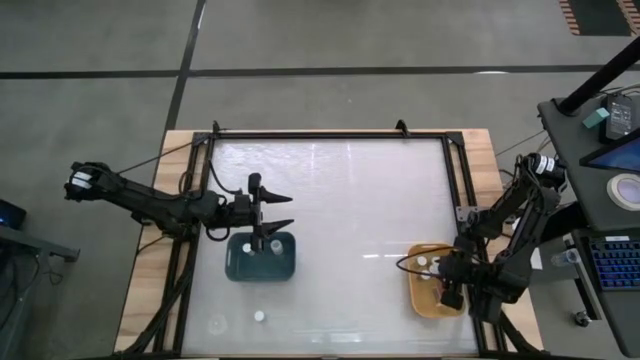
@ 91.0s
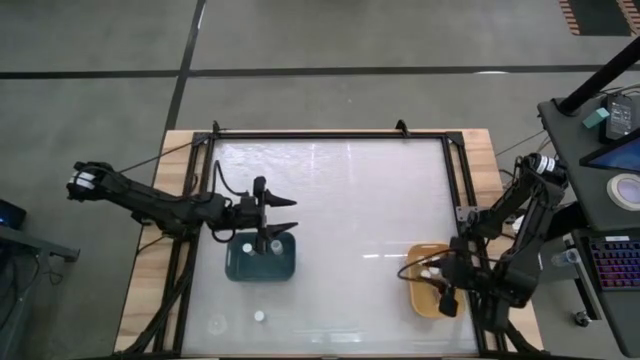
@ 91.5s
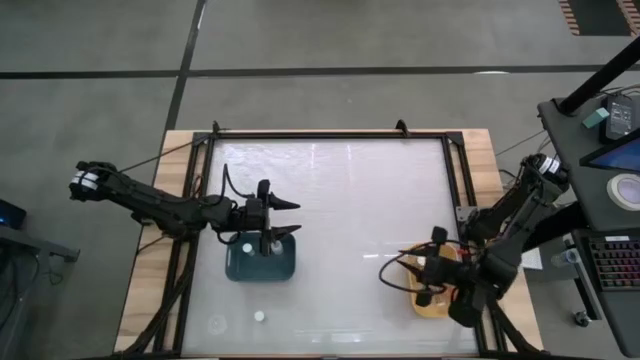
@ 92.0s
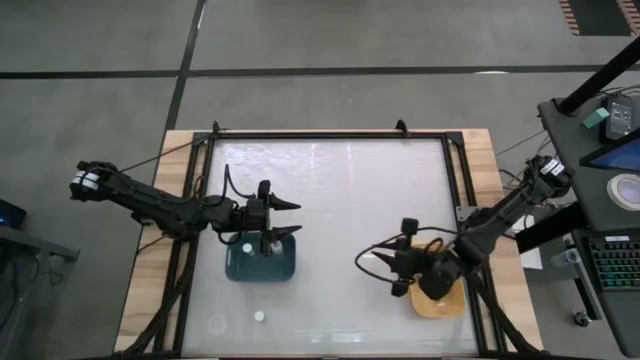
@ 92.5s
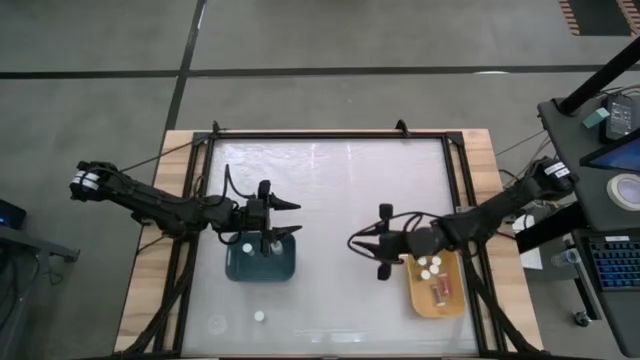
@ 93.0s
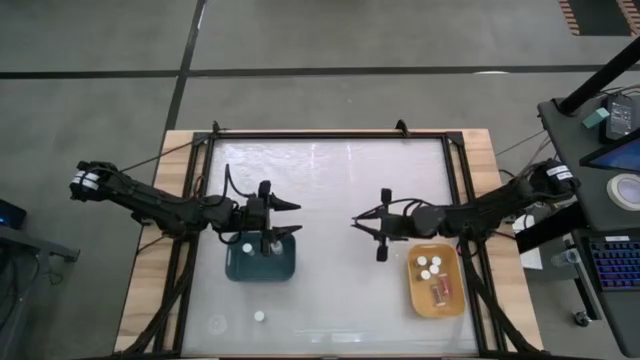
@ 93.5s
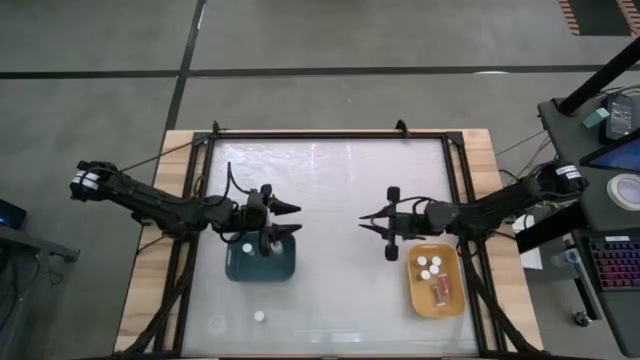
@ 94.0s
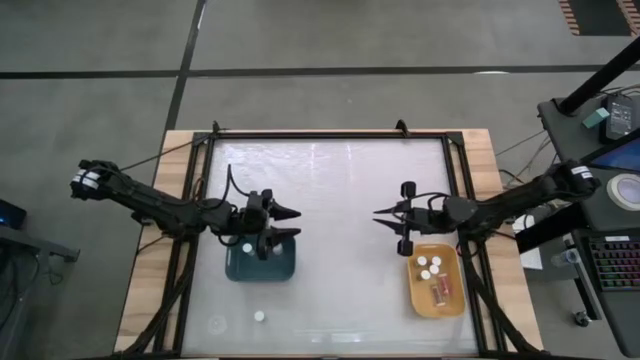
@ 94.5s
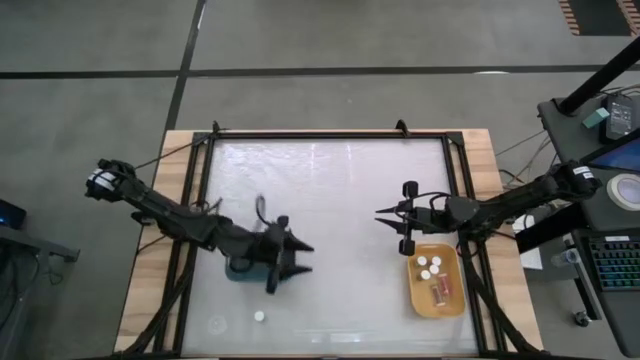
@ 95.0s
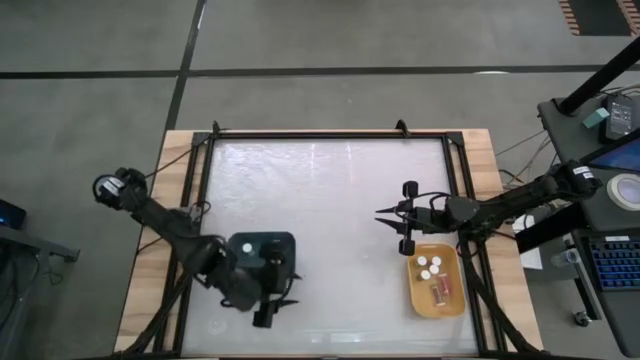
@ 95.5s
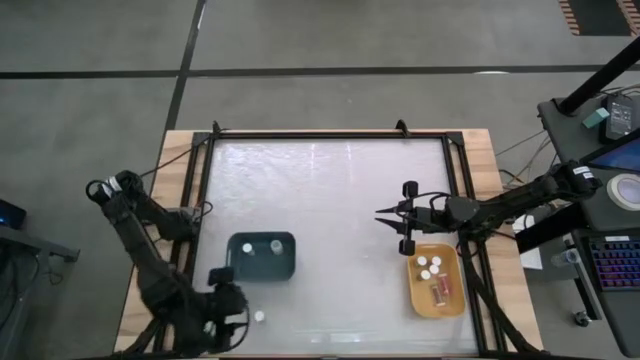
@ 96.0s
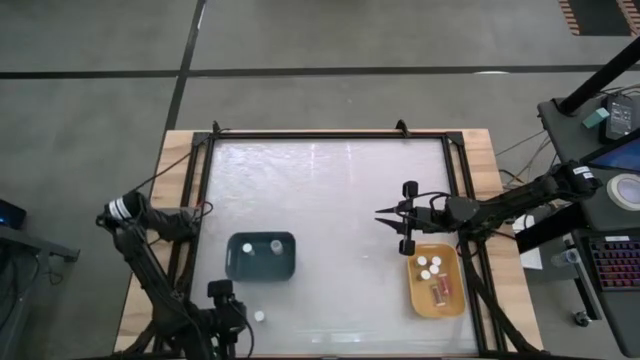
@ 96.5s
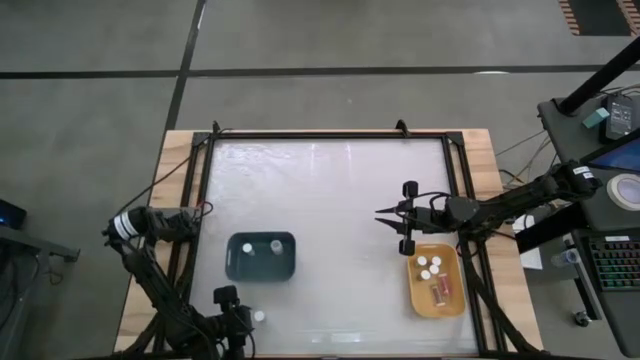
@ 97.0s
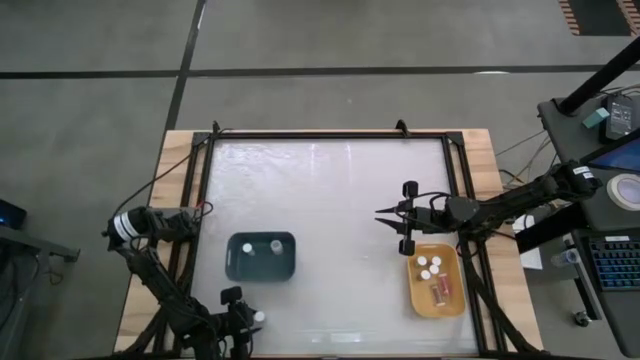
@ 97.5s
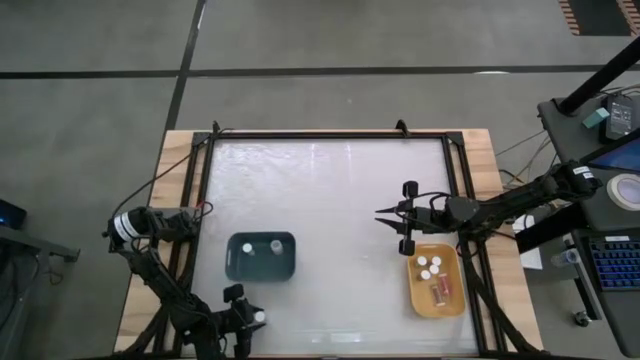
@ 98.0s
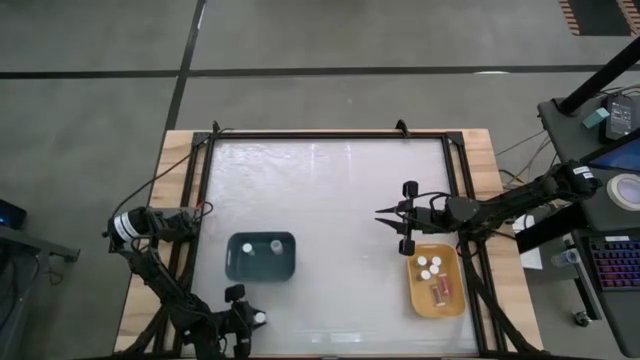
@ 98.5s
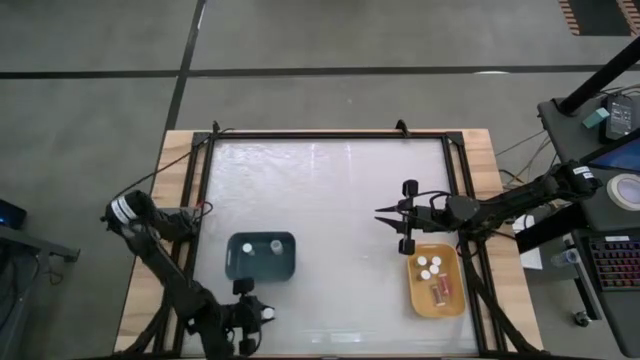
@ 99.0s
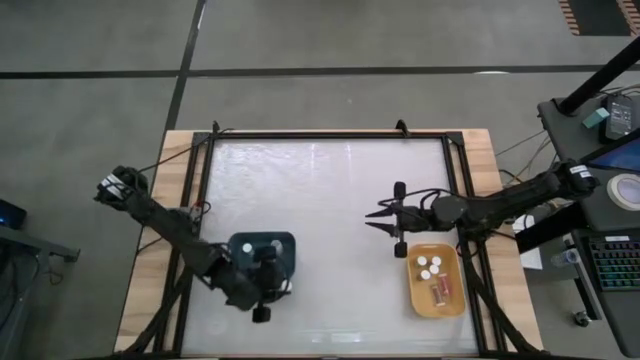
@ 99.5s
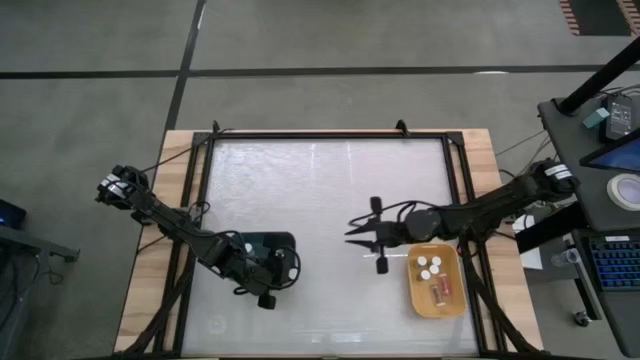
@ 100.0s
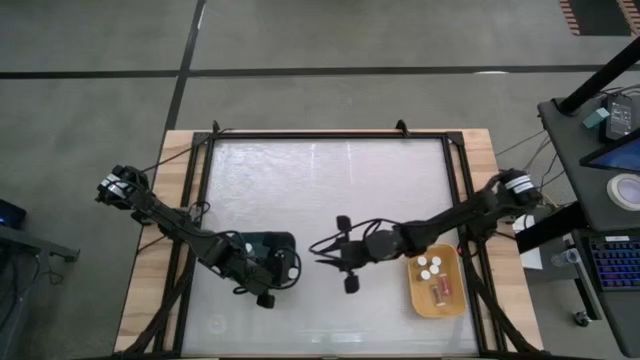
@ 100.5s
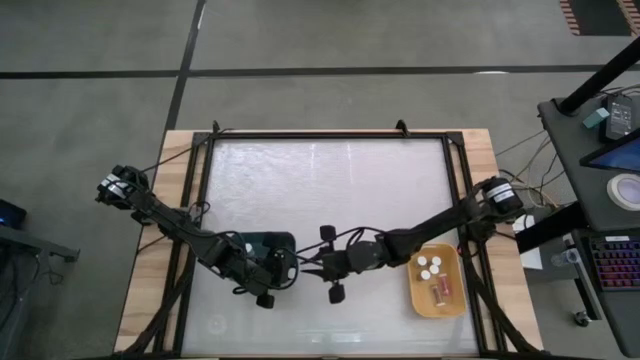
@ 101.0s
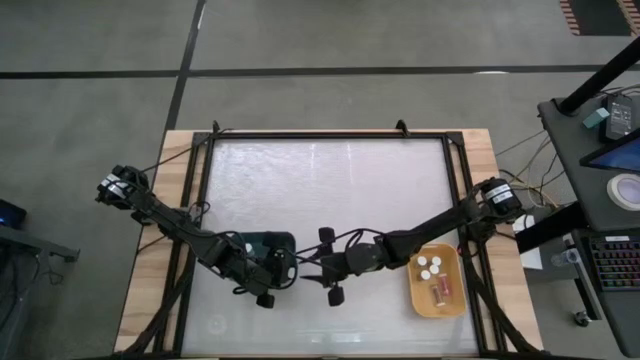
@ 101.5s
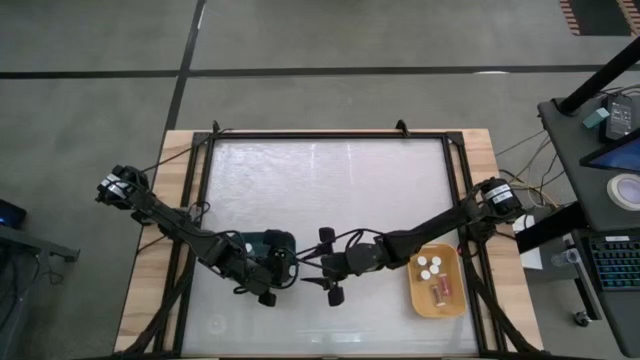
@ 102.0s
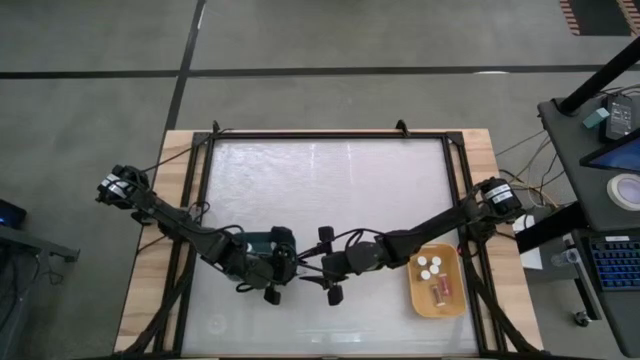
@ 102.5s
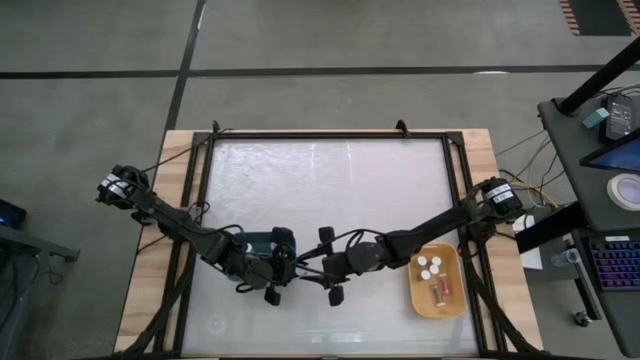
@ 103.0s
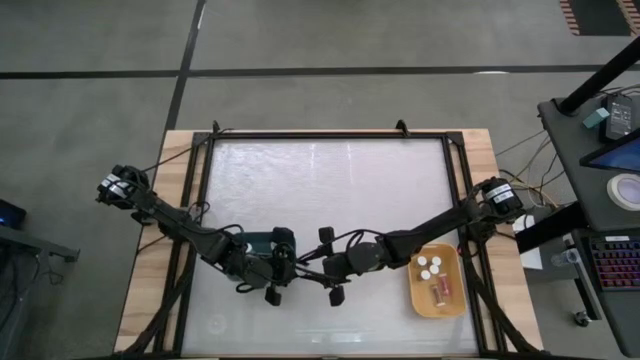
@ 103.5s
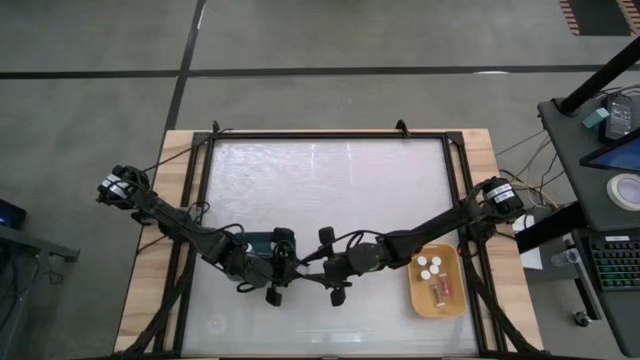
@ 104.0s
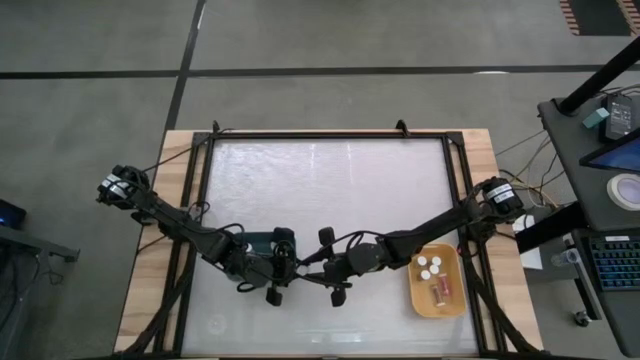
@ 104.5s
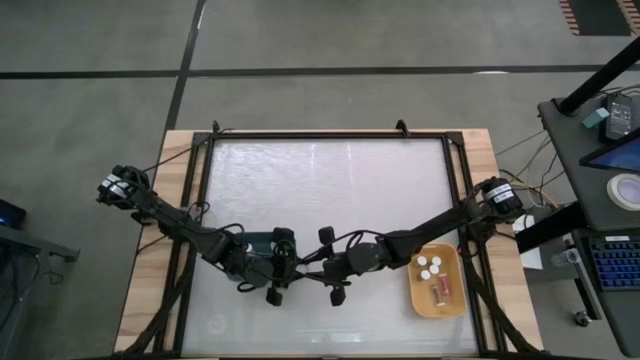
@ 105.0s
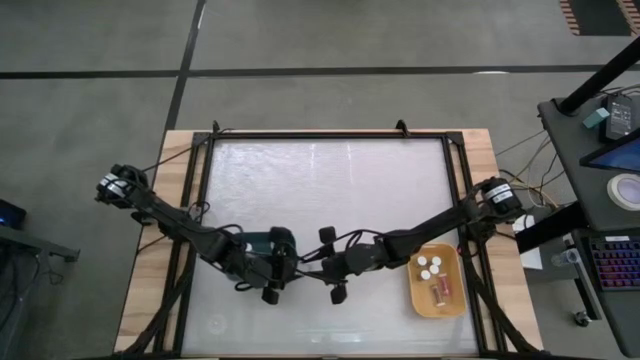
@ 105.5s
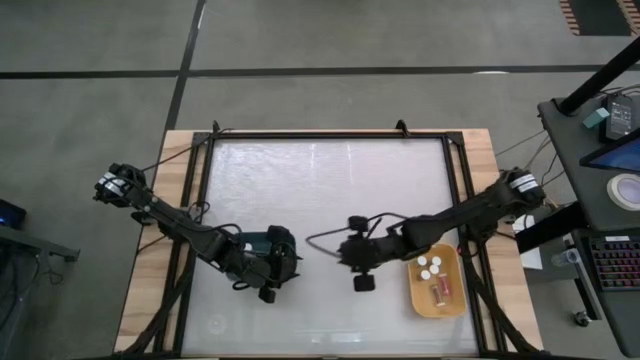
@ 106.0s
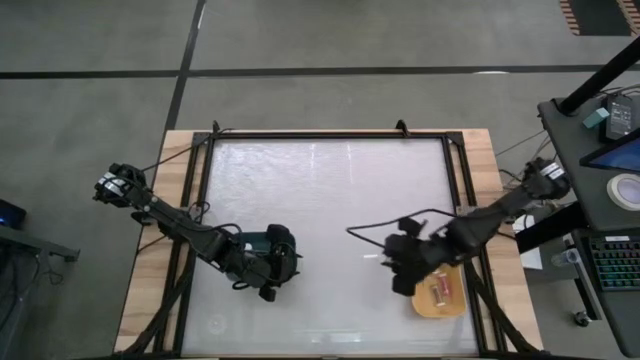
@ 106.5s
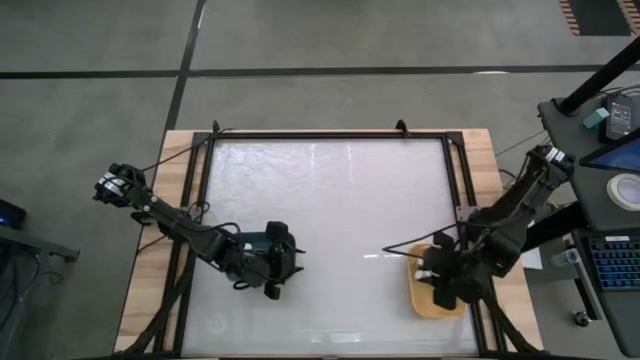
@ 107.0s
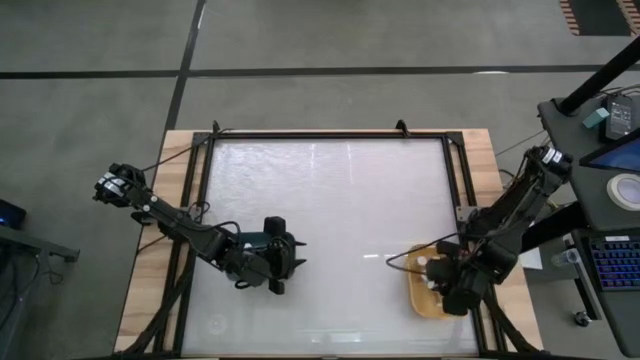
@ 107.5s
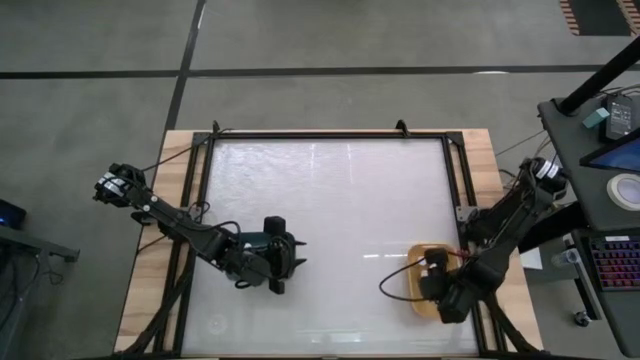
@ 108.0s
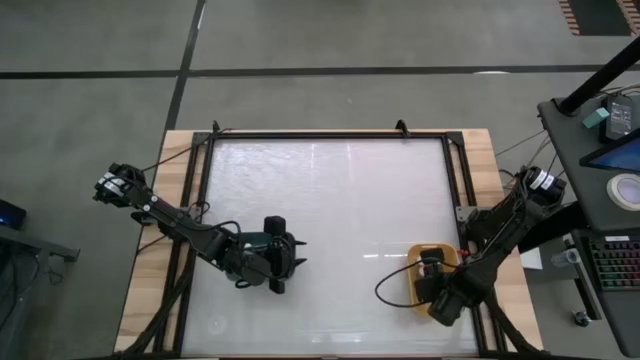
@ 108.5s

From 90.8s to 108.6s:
Task: Pick and place medicine bottles into bin by pill shape (circle, oval)
Put the blue bottled capsules into the yellow bin

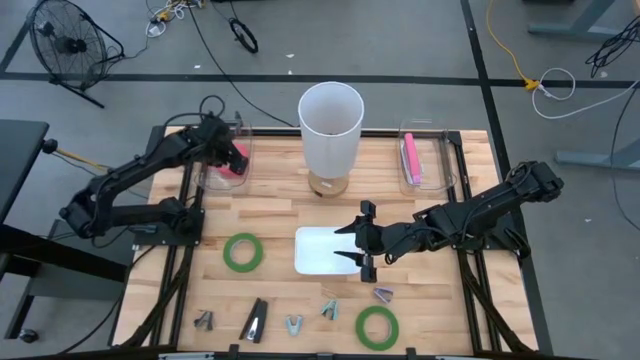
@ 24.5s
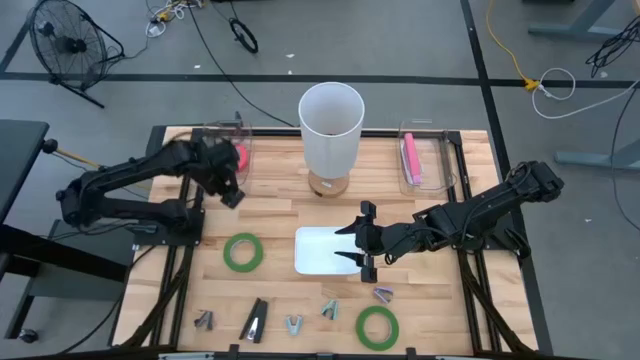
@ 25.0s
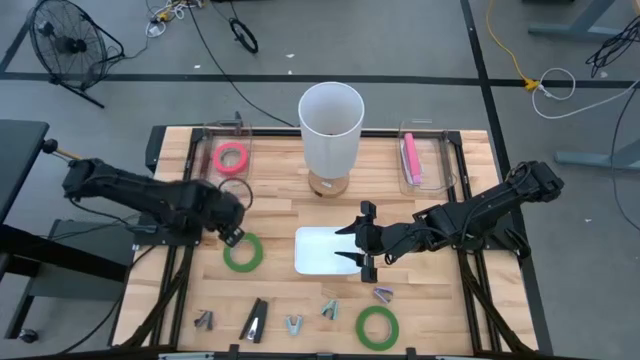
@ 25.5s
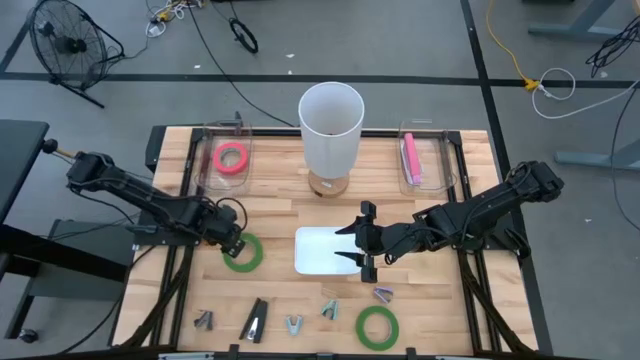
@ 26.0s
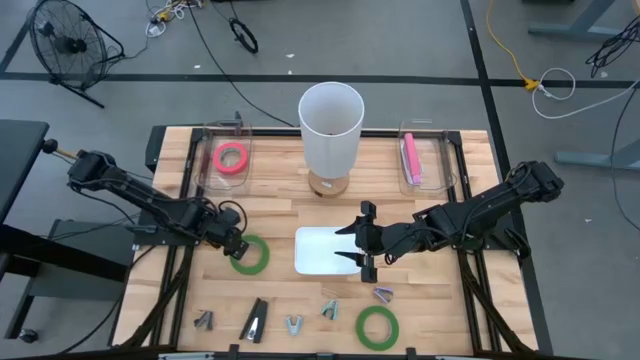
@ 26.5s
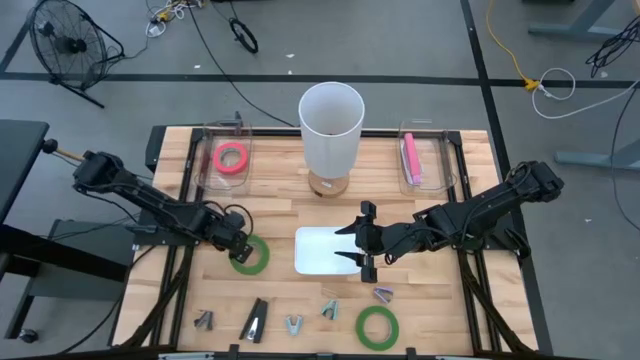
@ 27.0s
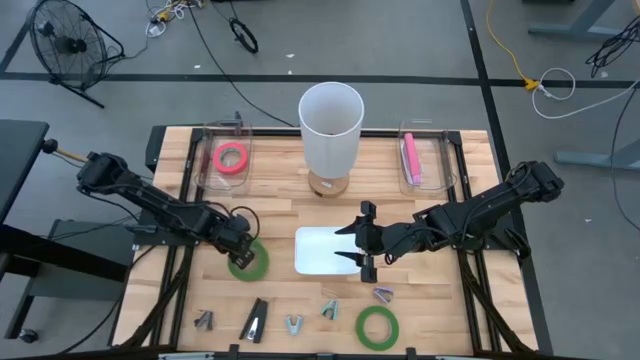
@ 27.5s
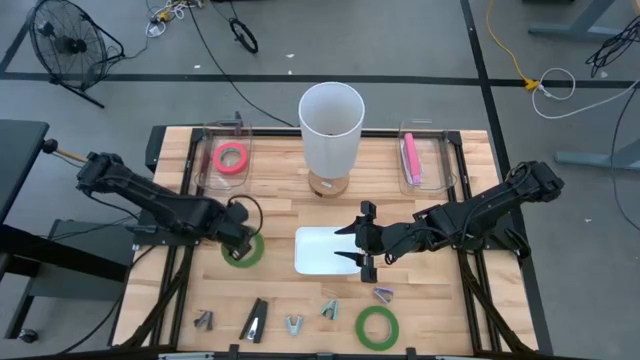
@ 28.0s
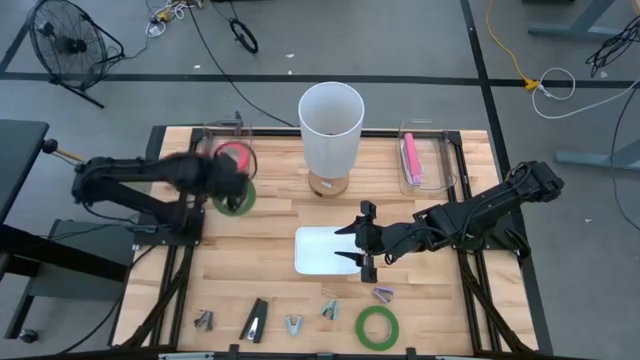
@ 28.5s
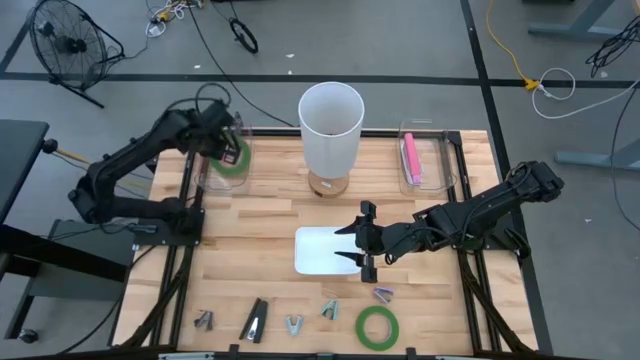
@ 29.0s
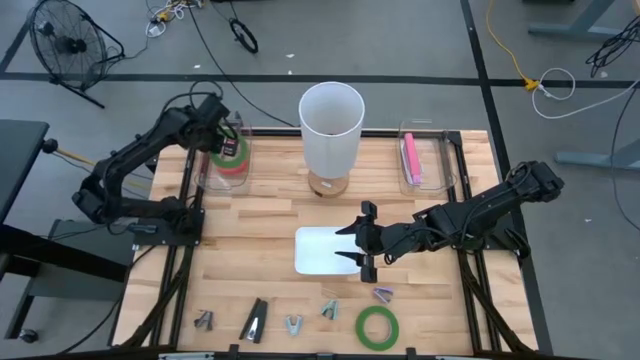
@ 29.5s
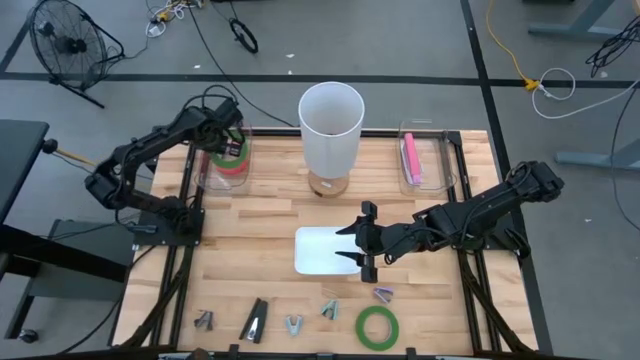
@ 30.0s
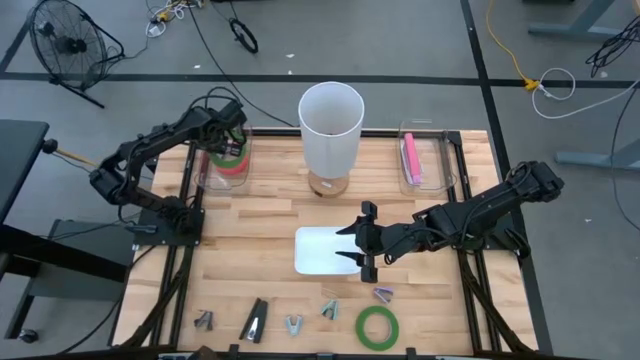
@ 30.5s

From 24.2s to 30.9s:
Task: Pick and place Stapler, Stapler remover, tape
Put the top green tape into the left transparent bin
